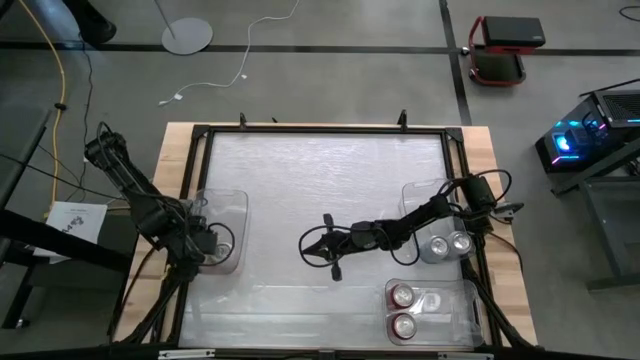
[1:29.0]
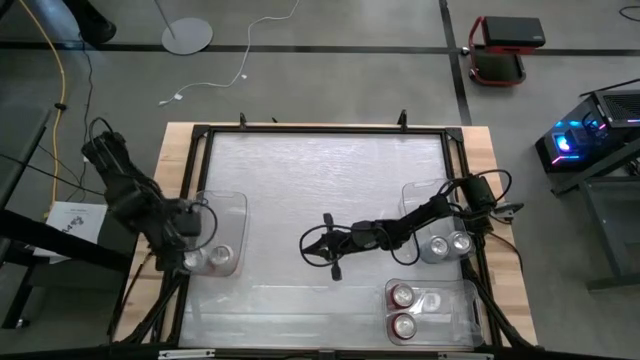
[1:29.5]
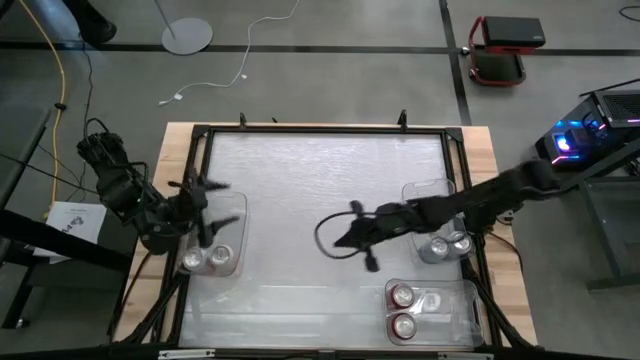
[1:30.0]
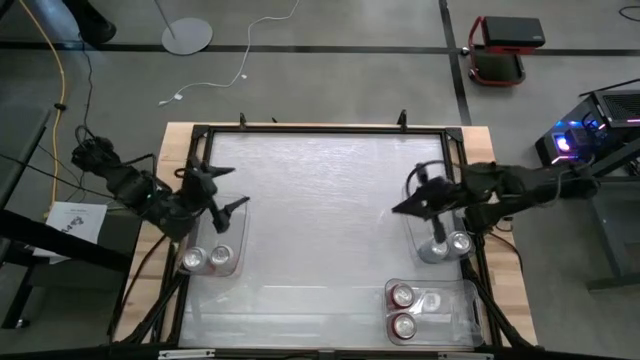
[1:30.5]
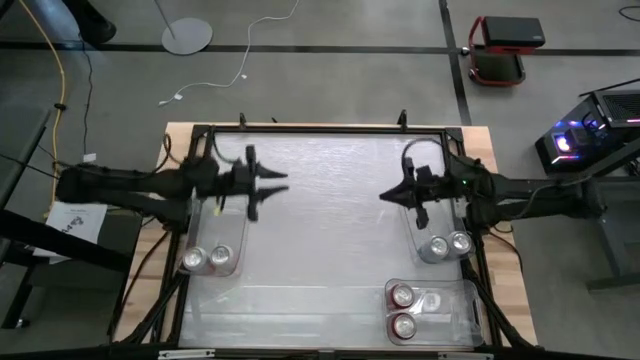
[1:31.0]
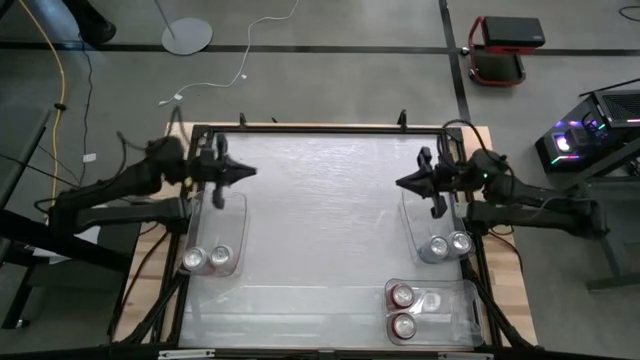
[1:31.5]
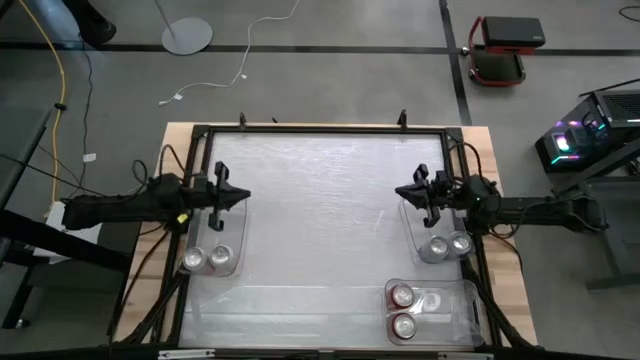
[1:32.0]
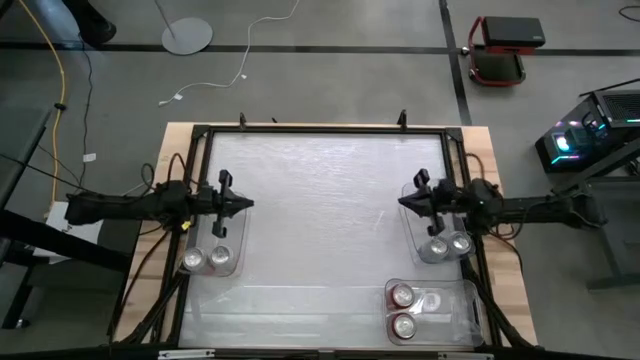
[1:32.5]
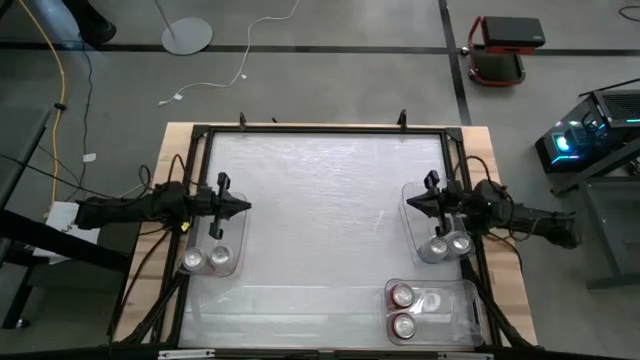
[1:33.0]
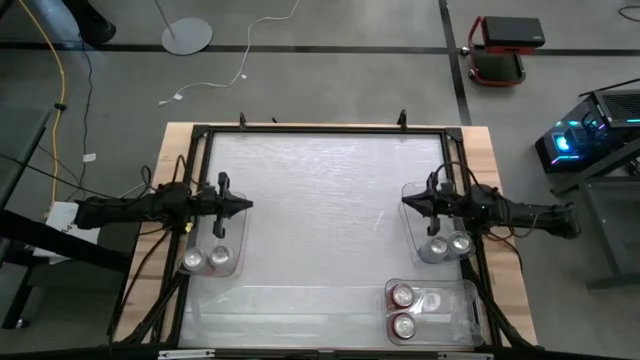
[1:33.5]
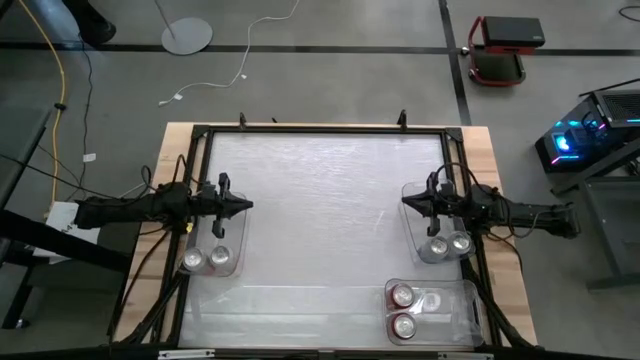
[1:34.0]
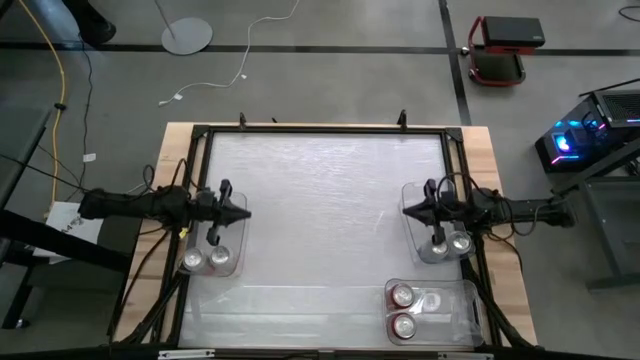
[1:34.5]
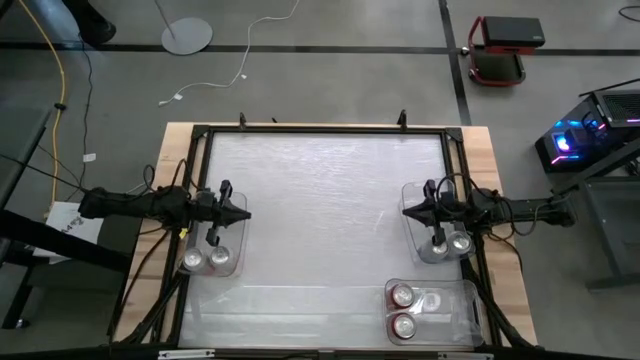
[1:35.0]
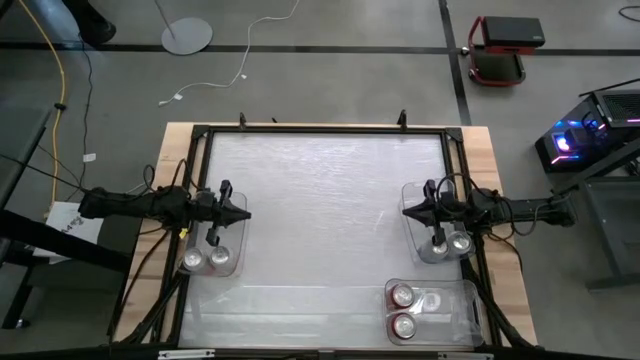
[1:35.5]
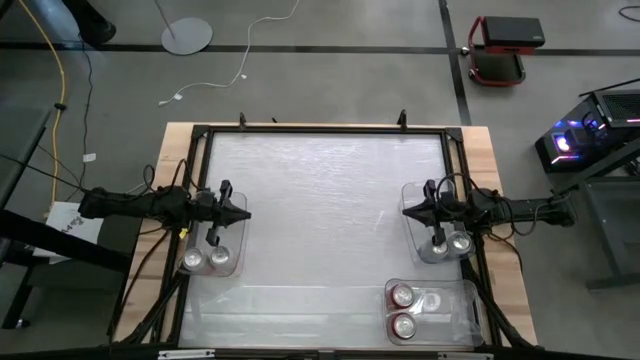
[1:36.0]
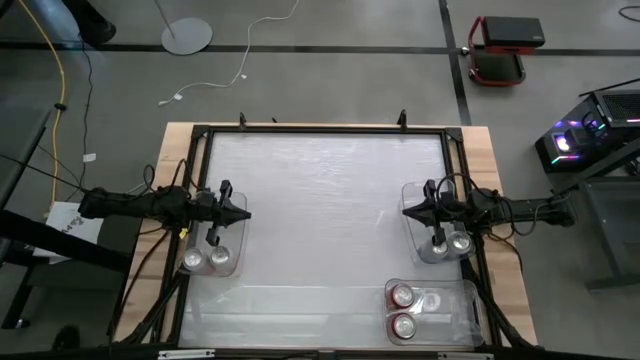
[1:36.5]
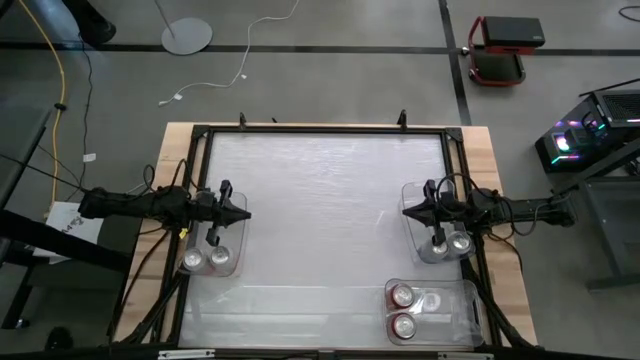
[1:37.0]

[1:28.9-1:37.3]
Task: Sort soda cans
Return to Home Position

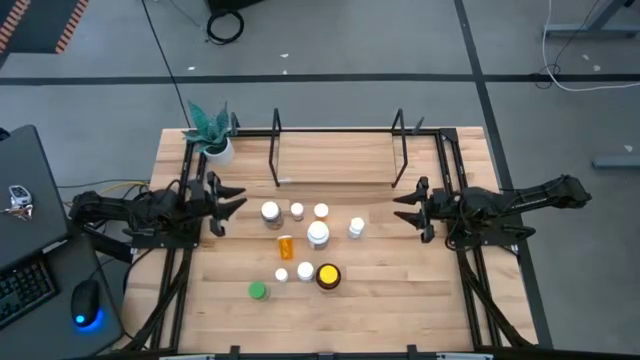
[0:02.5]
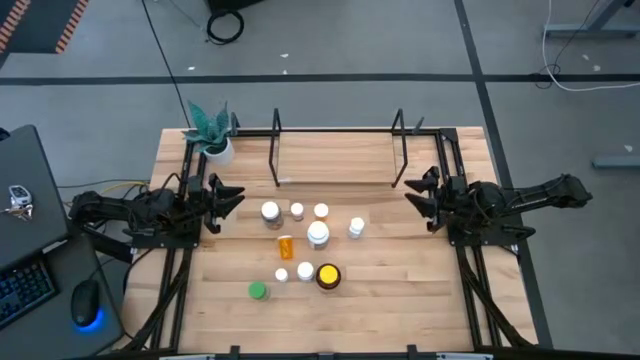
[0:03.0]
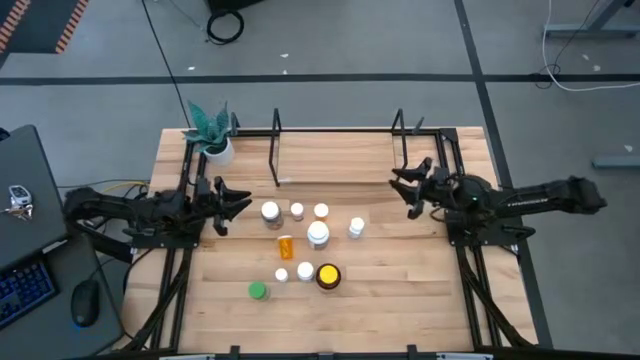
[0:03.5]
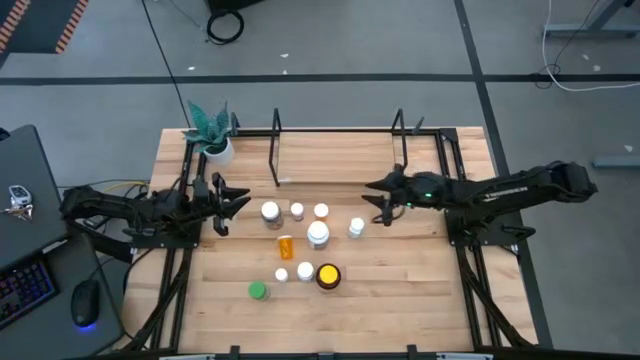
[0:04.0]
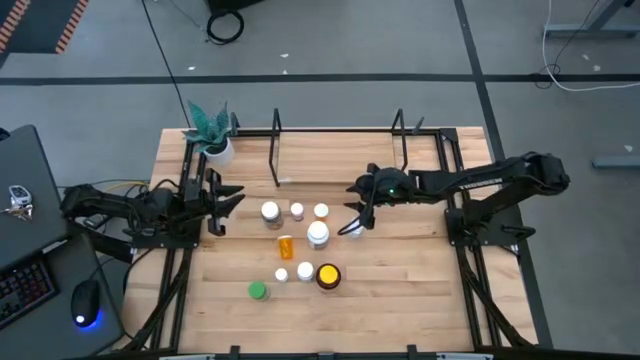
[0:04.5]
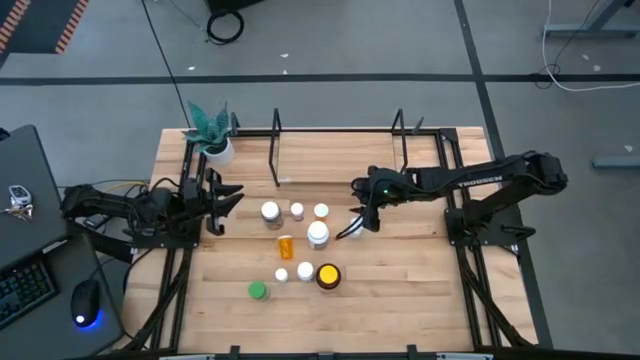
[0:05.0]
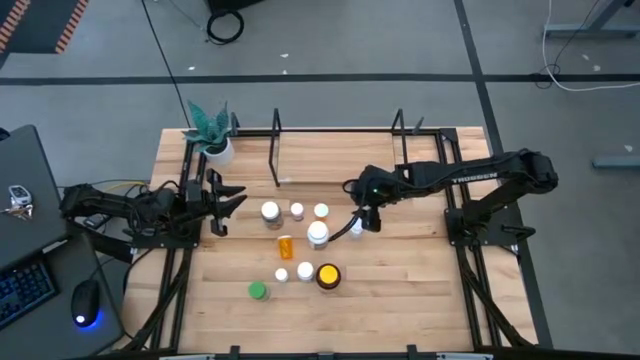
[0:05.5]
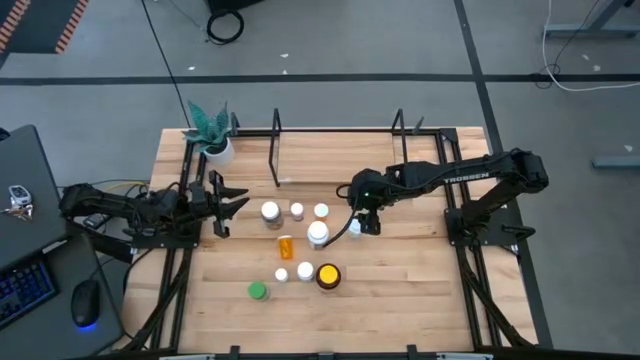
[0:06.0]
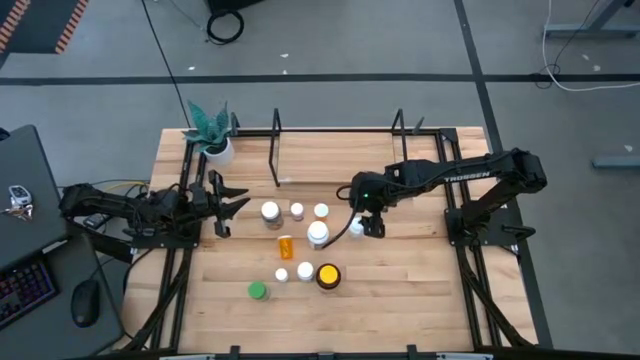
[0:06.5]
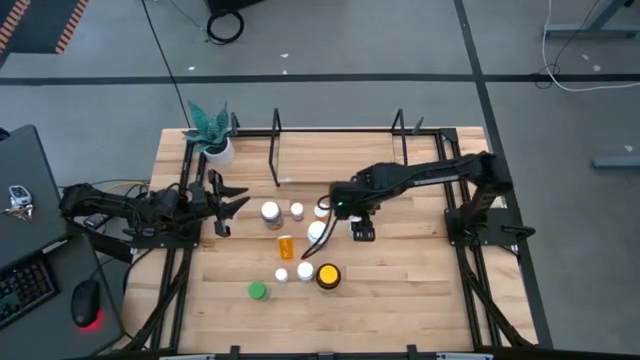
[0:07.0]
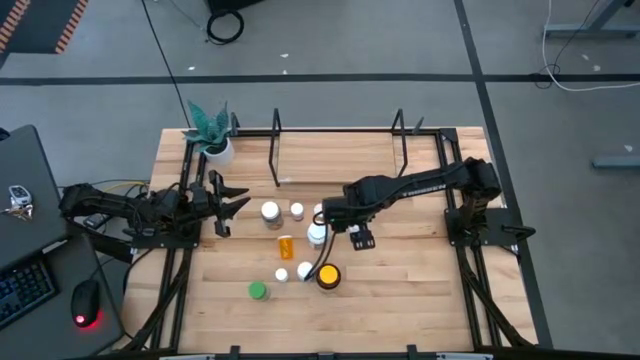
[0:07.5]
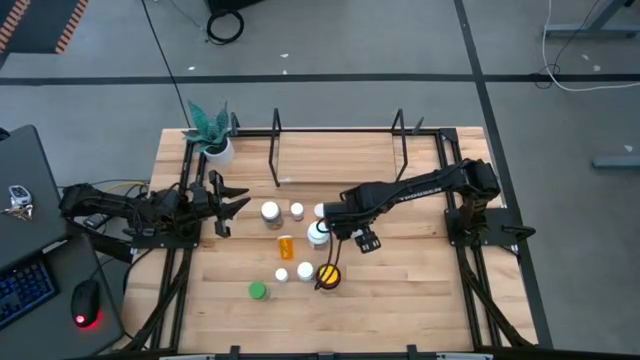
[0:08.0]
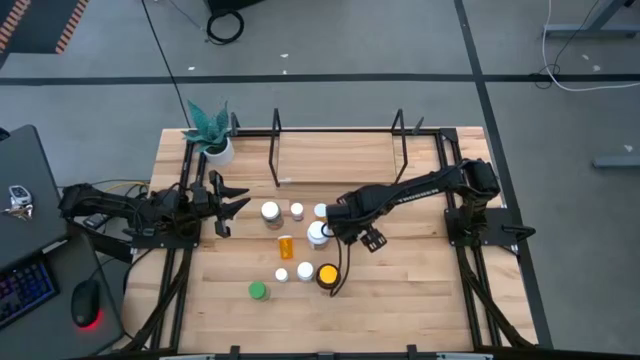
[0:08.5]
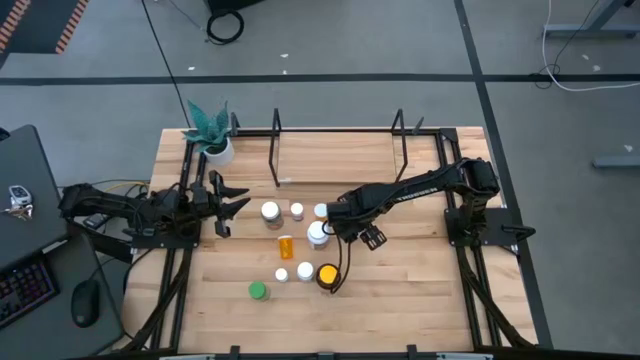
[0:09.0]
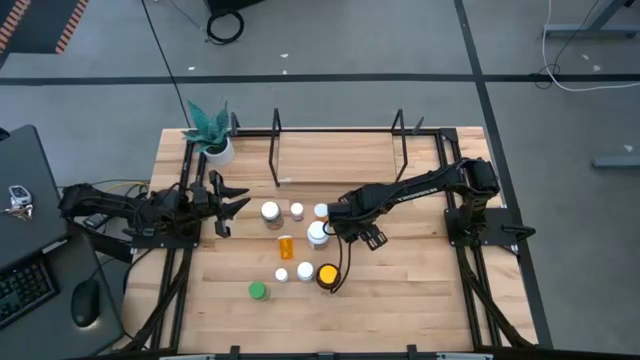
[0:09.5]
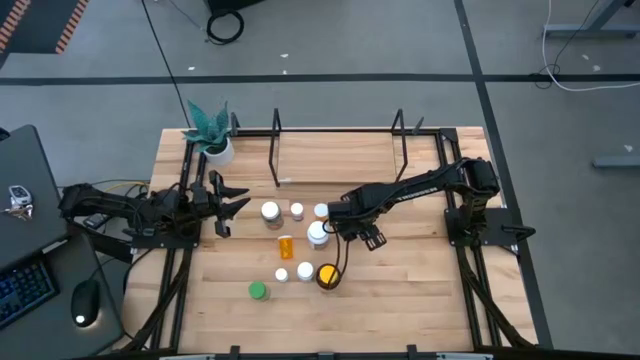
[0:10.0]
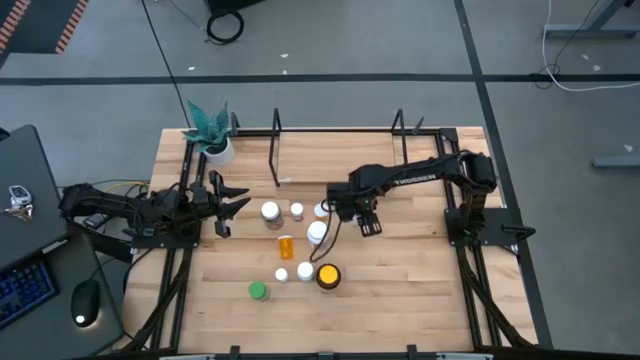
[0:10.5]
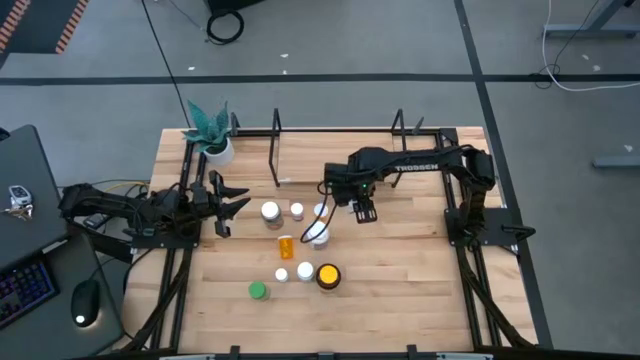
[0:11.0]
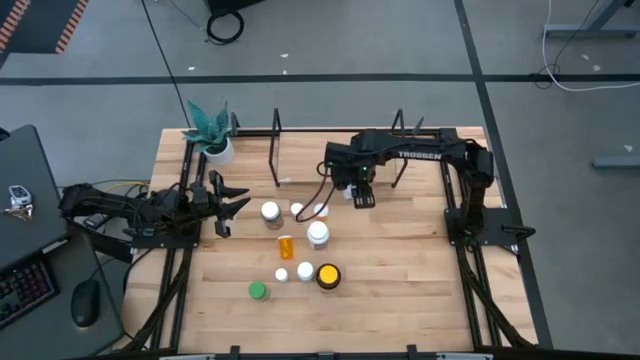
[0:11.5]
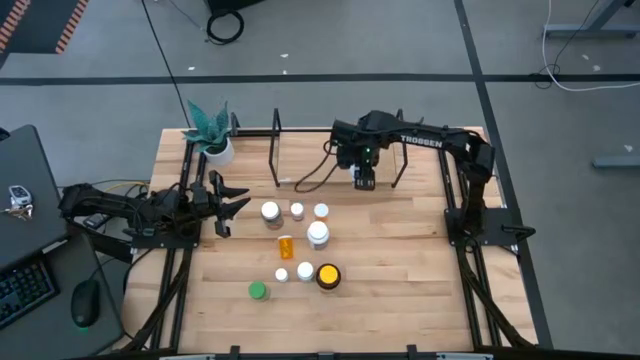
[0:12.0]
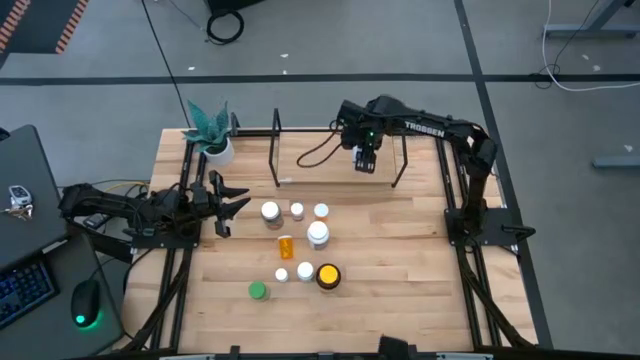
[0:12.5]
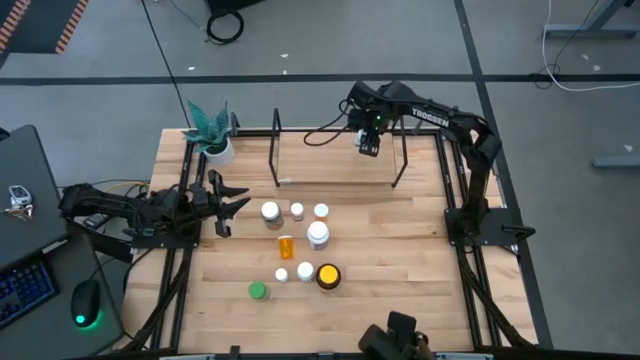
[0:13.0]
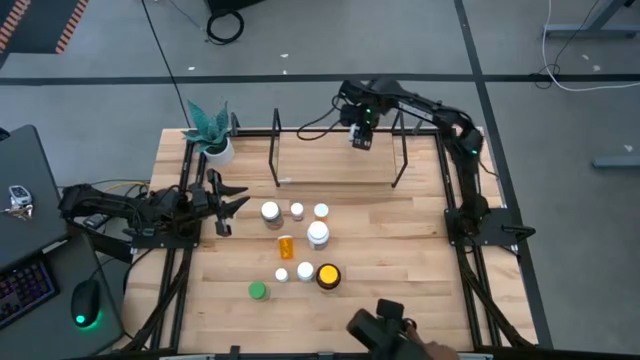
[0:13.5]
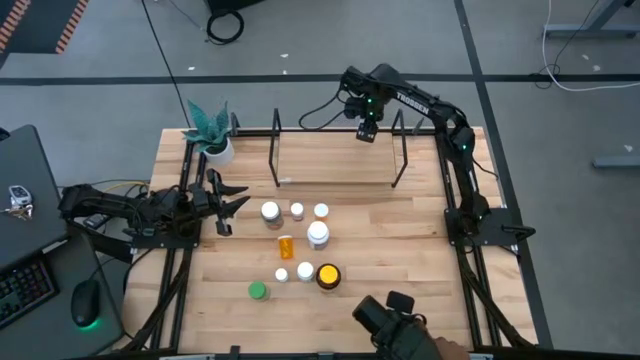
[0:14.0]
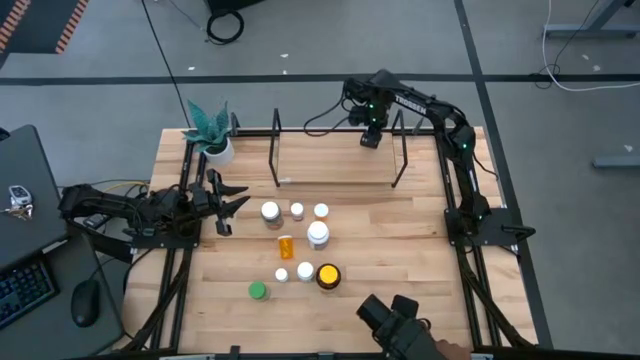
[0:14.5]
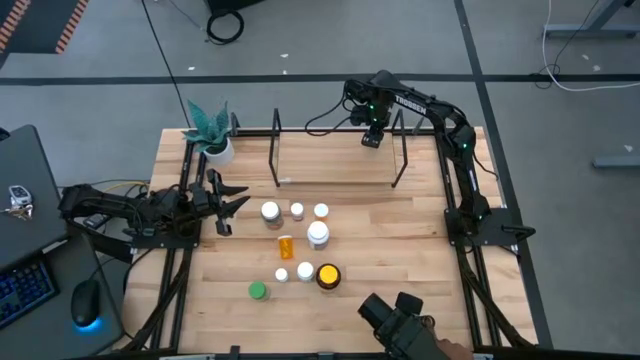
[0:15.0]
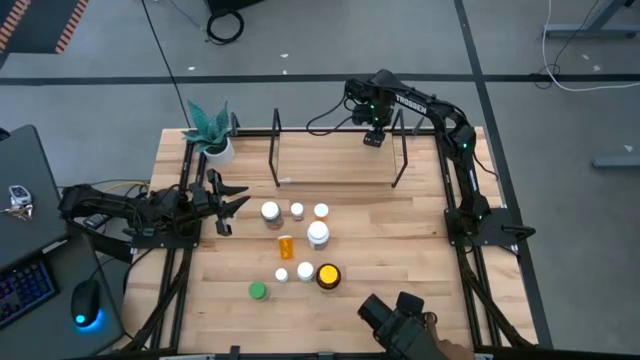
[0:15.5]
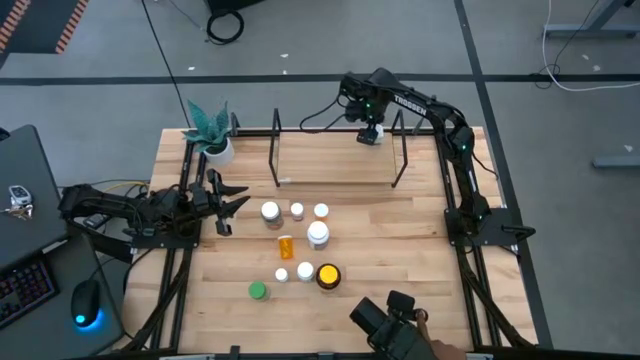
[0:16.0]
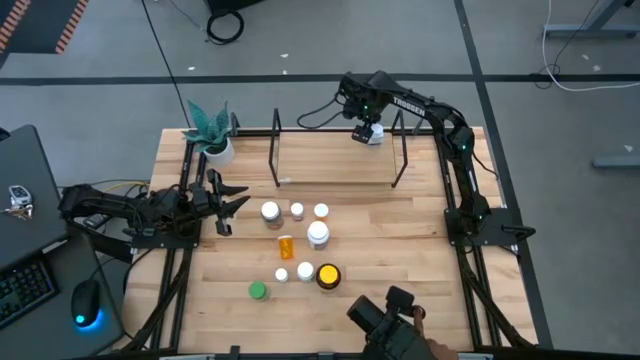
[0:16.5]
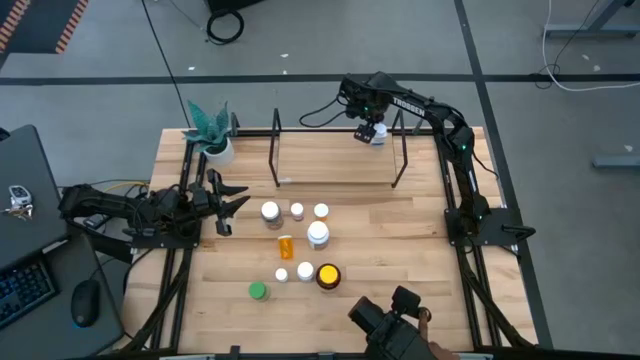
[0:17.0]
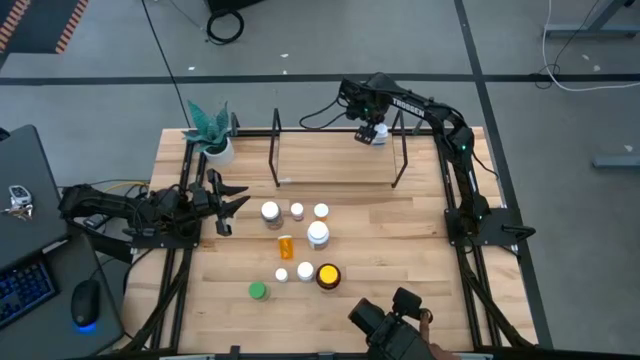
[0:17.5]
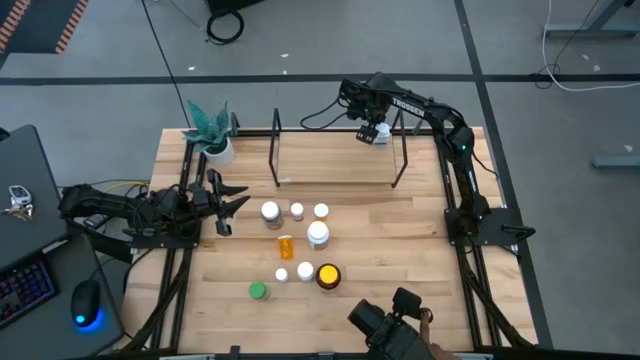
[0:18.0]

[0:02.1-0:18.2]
Task: Pick and place medicine bottles onto shelf by color
Put the white-blue pill bottle on the shelf
